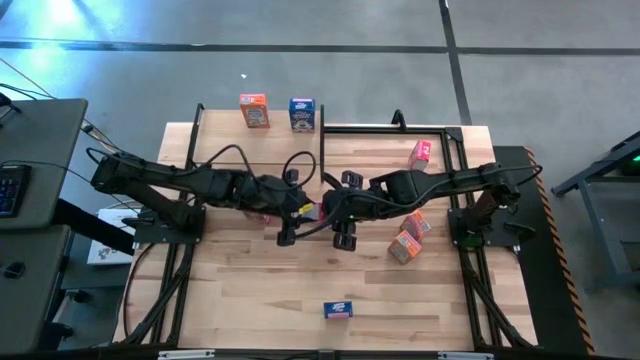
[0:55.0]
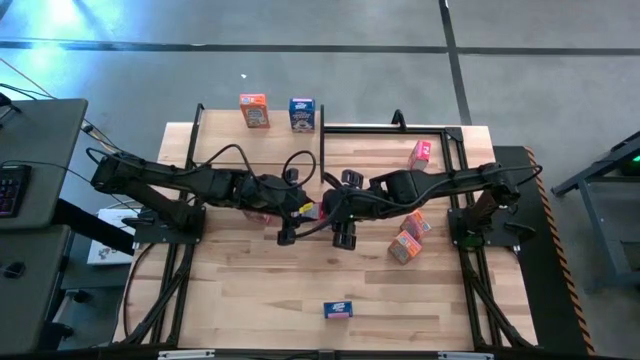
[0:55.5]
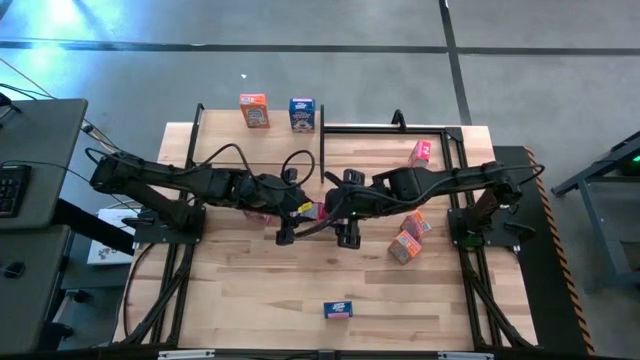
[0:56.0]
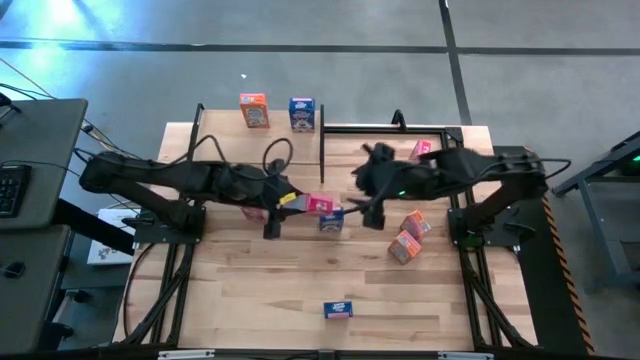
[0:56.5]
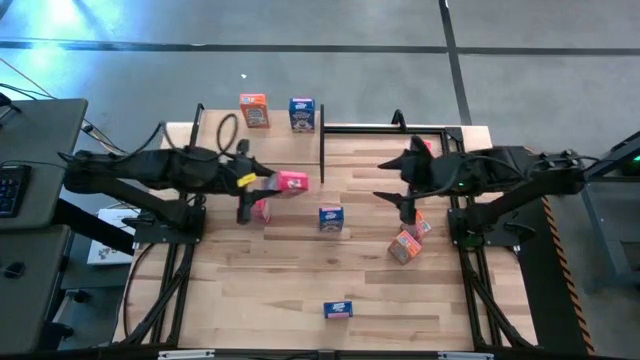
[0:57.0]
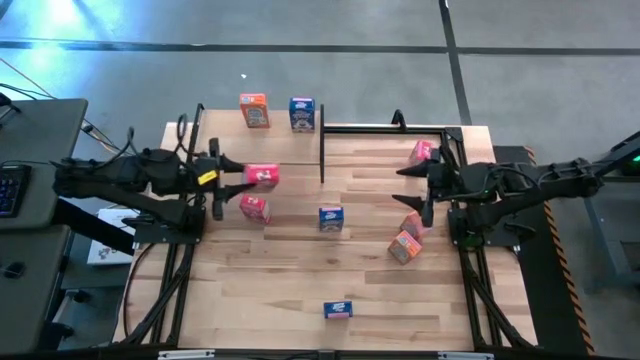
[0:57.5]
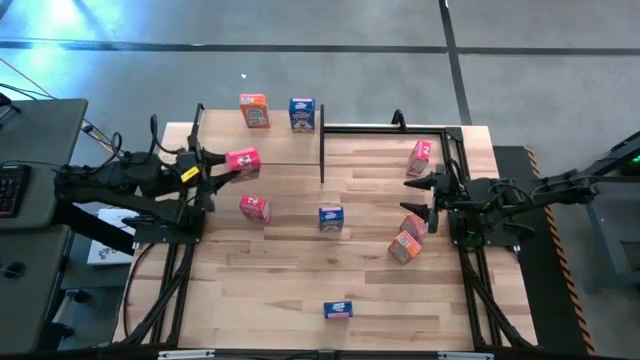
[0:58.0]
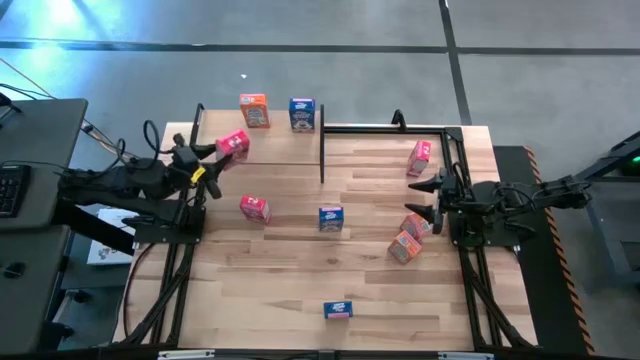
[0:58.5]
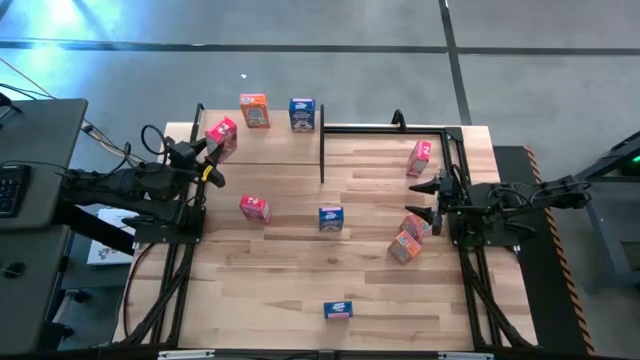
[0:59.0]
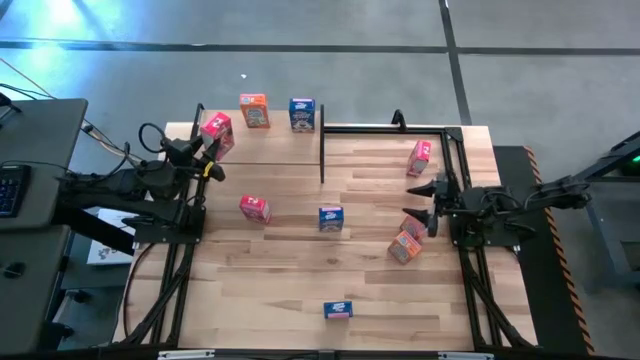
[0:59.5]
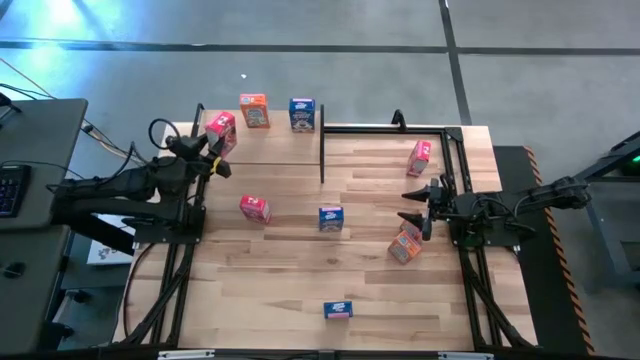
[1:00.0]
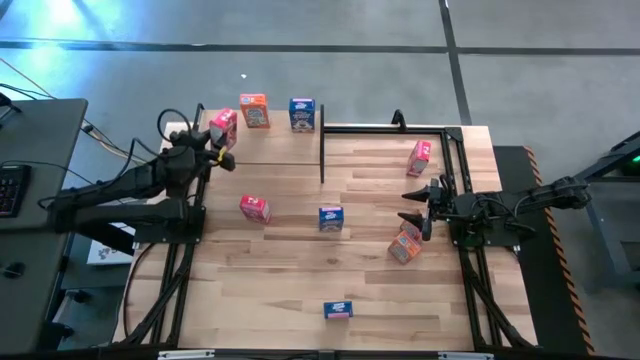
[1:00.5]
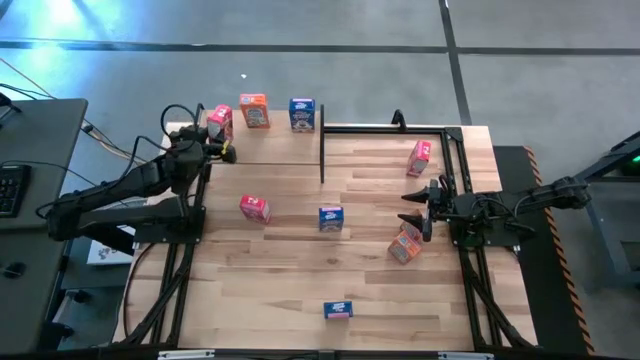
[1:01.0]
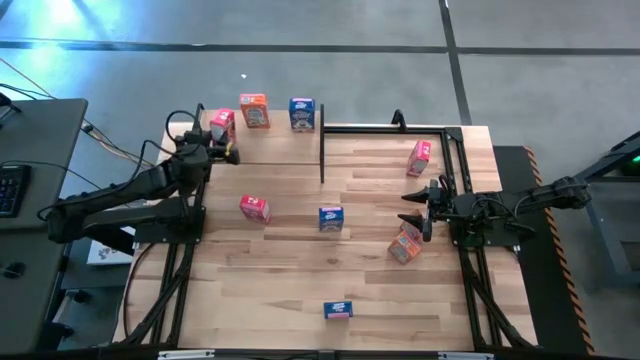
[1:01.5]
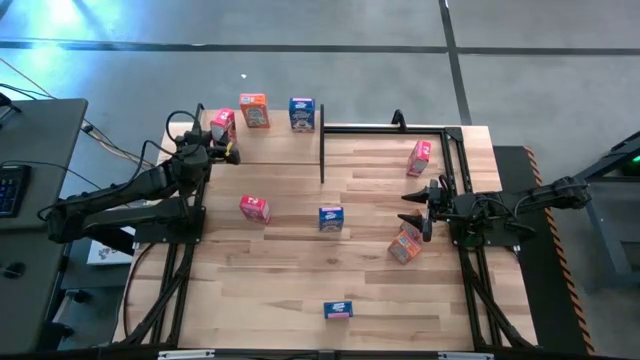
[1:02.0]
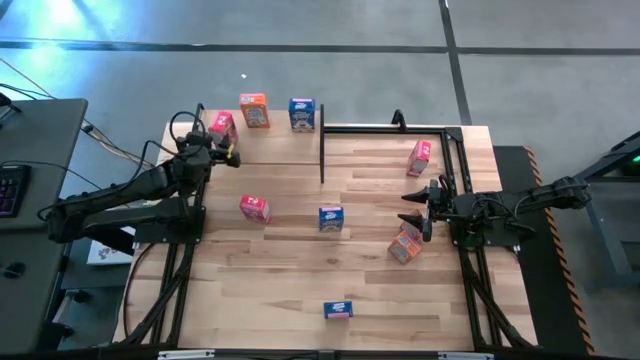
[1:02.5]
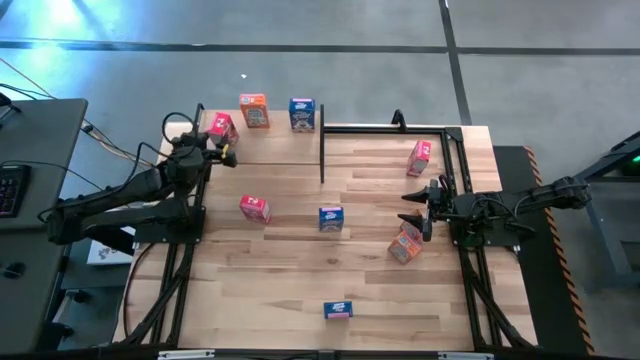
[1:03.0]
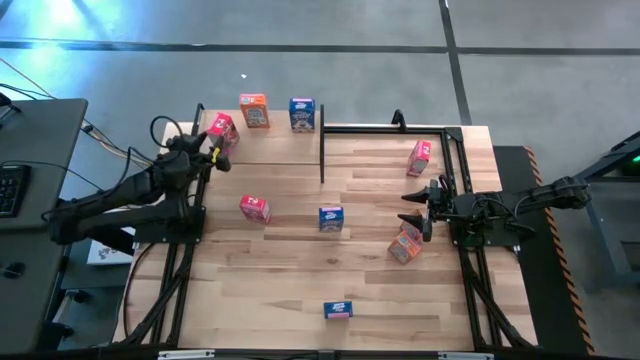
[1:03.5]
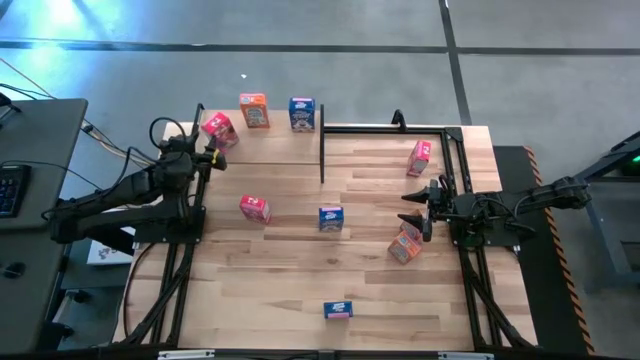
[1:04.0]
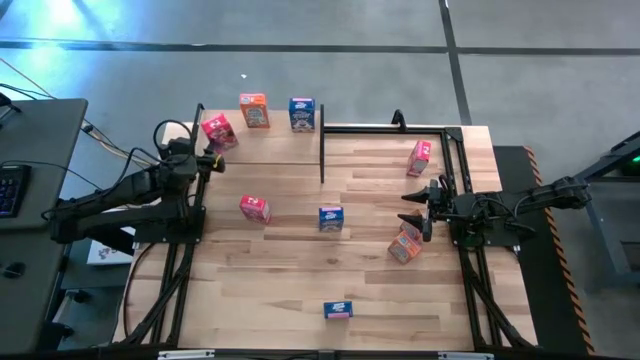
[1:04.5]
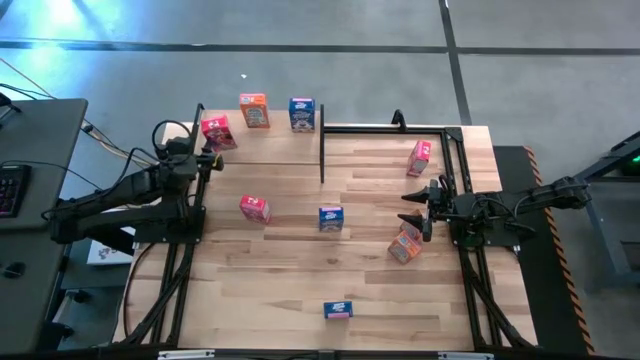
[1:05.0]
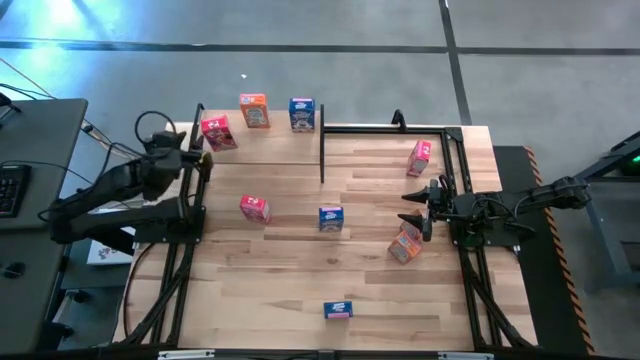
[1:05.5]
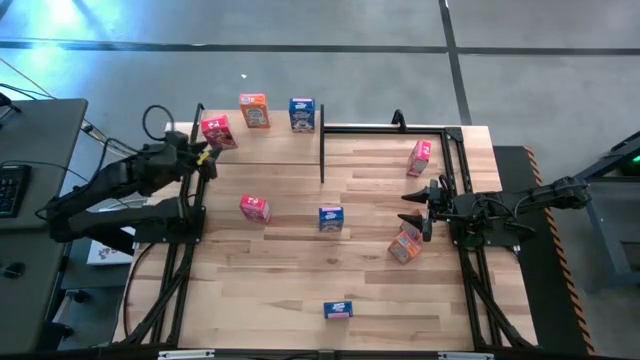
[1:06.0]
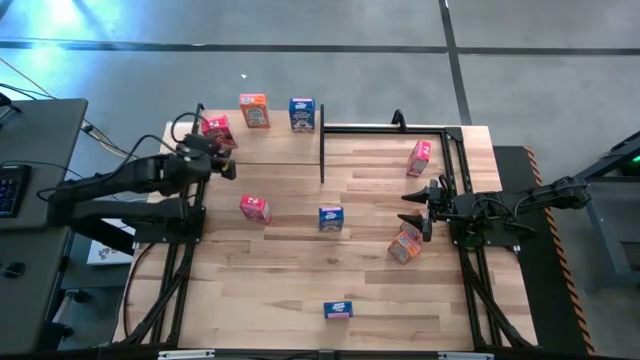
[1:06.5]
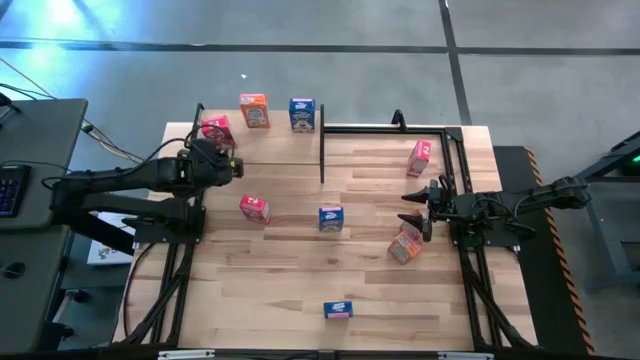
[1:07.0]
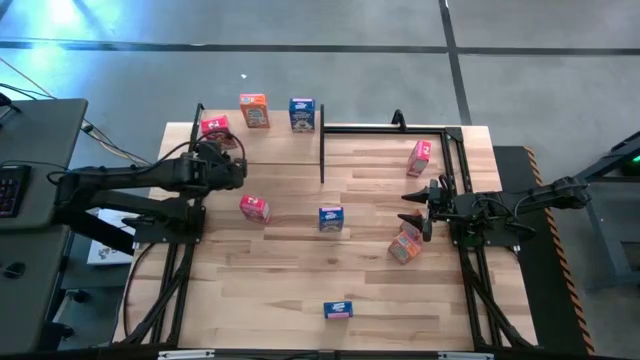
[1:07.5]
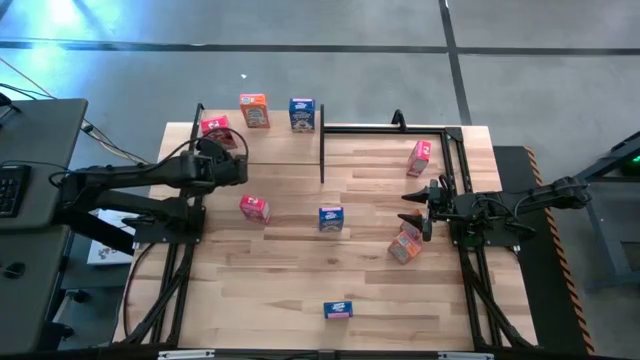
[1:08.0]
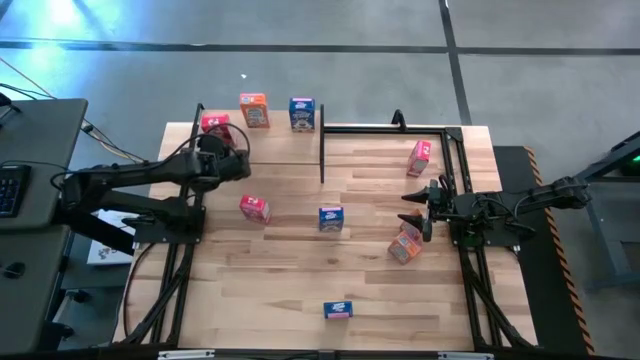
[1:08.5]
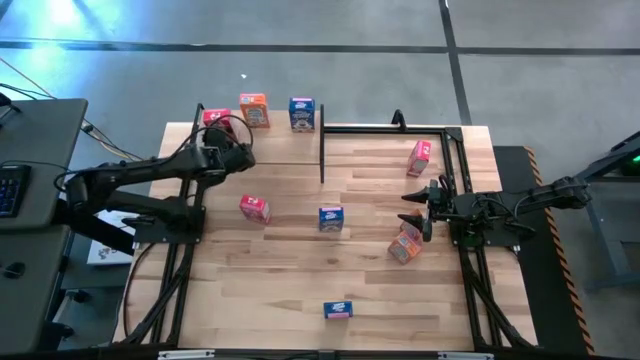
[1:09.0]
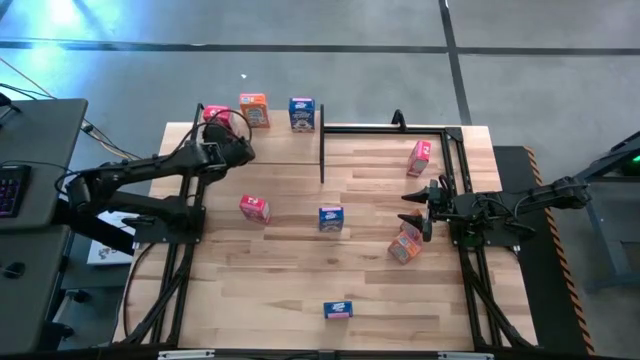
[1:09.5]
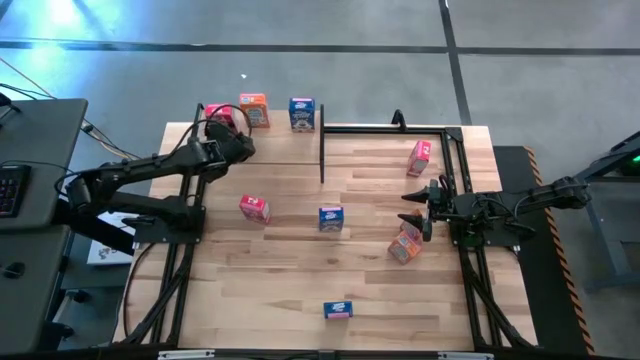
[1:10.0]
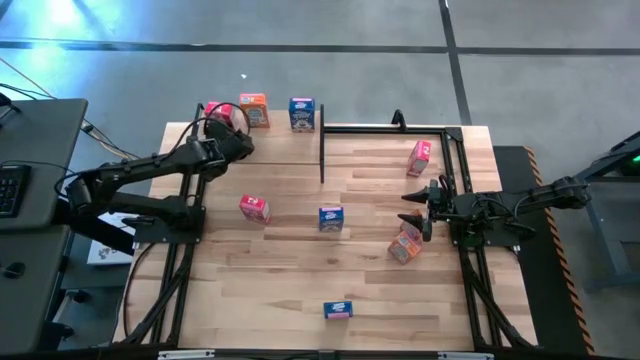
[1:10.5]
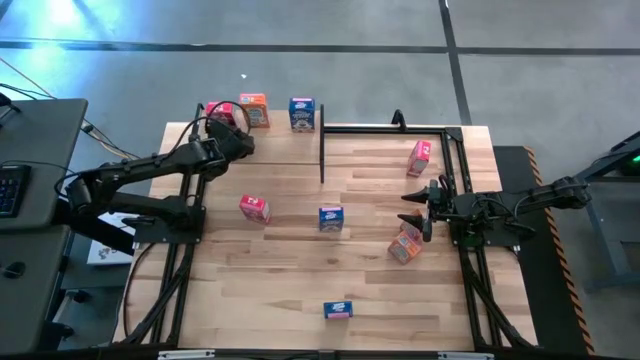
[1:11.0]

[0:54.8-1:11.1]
Task: Stack cereal on shelf
Put the bottom right red cereal box on the the shelf

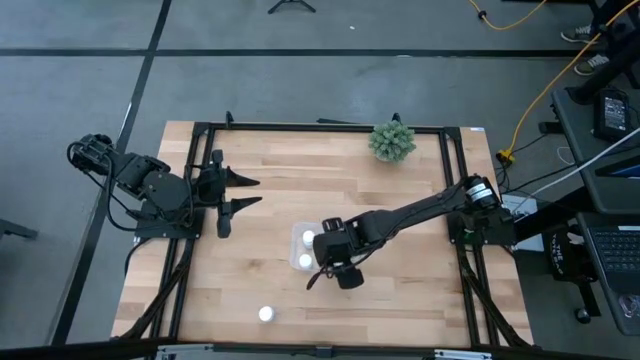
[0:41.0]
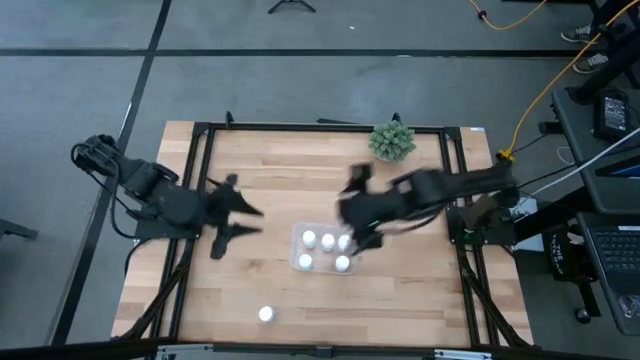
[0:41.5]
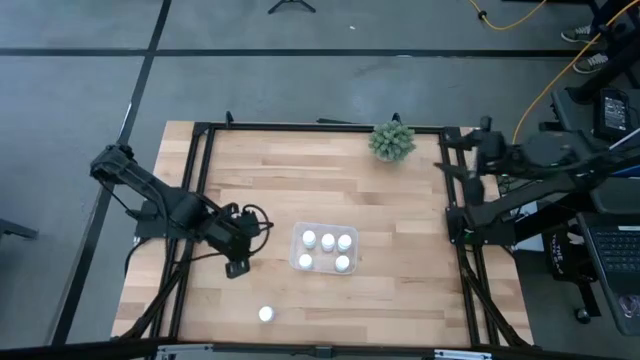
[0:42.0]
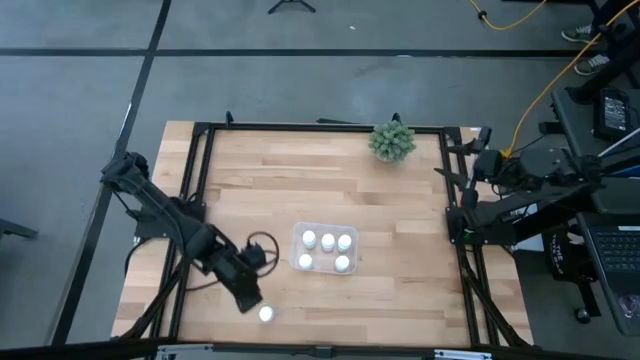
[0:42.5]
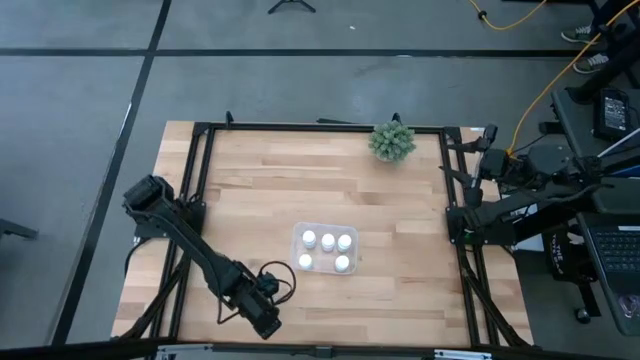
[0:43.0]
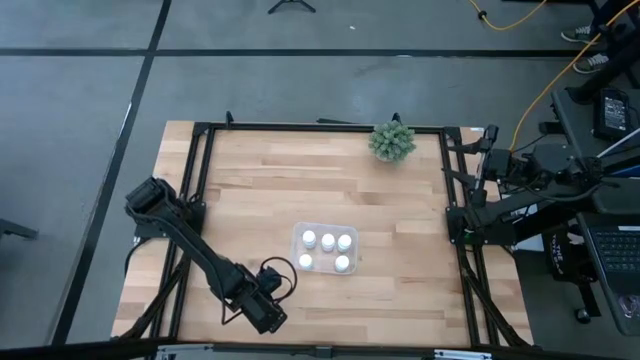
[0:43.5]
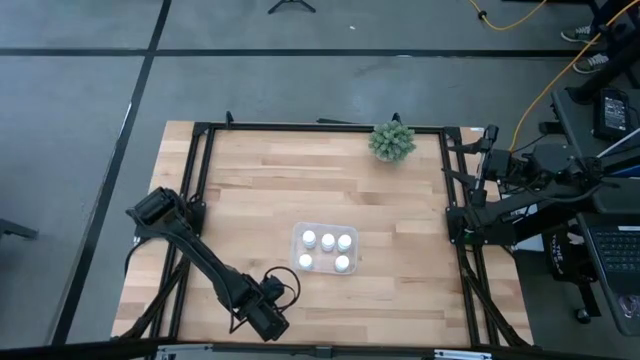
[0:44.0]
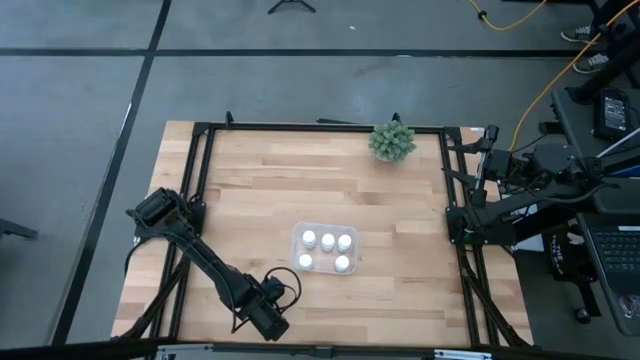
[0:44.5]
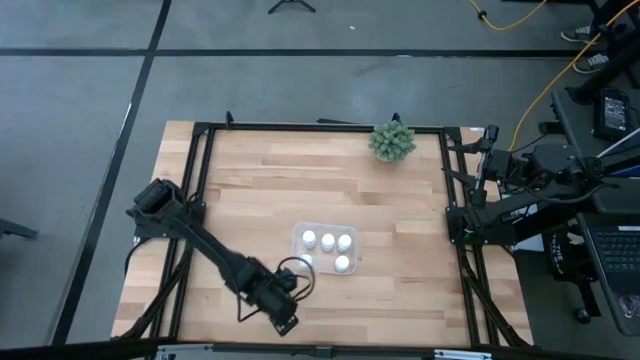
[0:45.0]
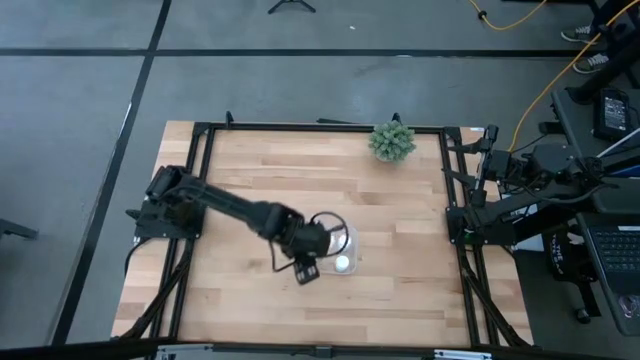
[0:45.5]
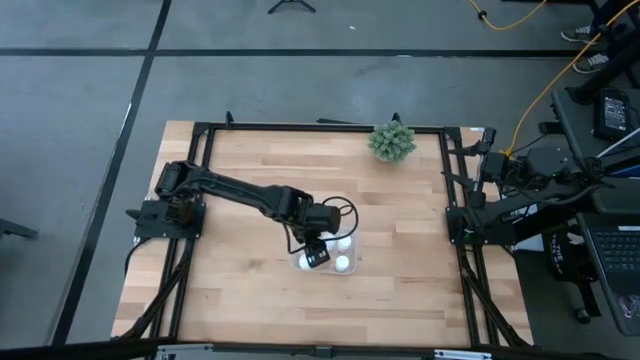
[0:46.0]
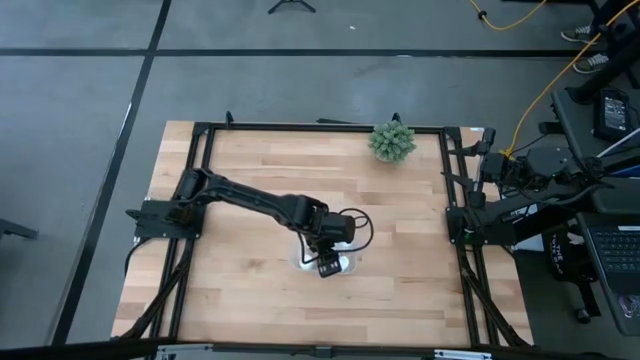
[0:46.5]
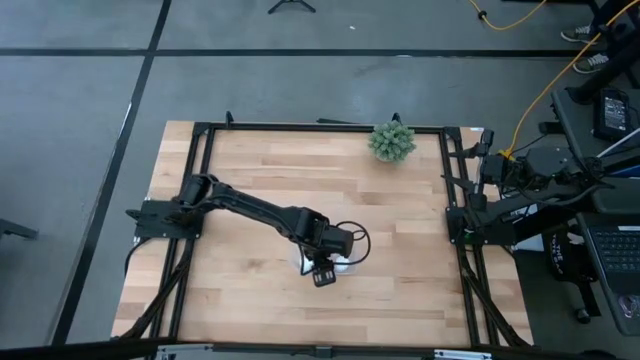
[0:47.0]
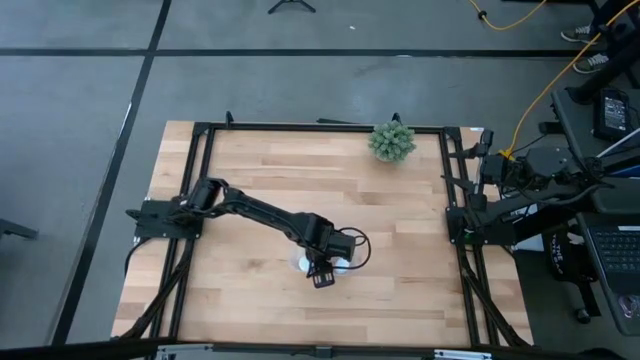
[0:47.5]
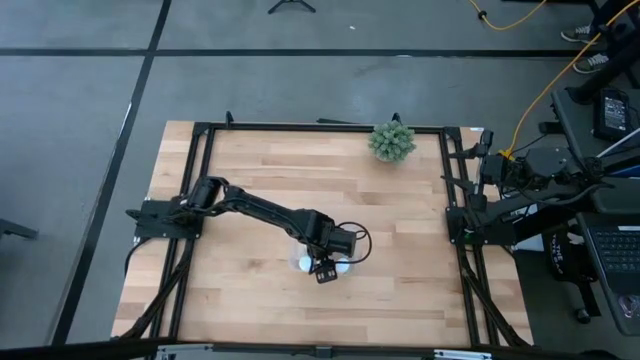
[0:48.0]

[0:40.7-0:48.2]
Task: Pick and place pill bottles into a basket
Put the white pill bottle into the transparent bin
